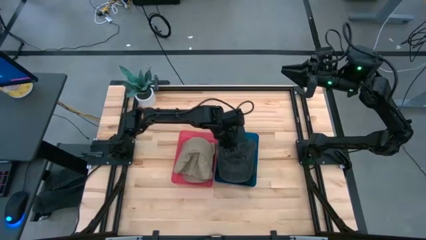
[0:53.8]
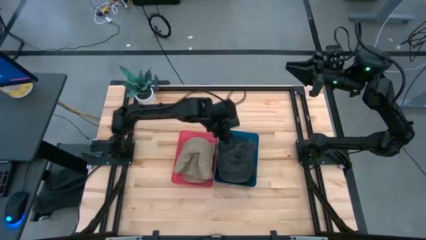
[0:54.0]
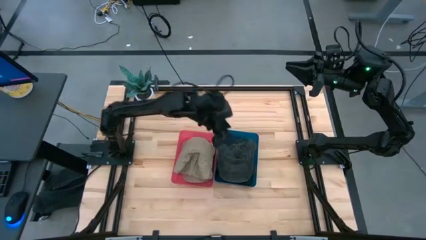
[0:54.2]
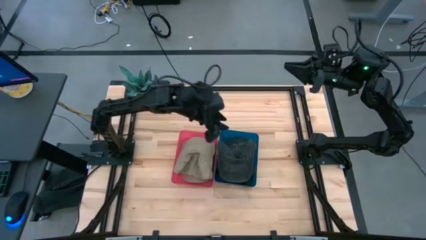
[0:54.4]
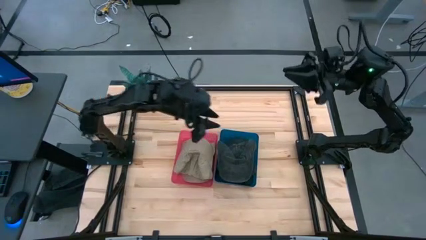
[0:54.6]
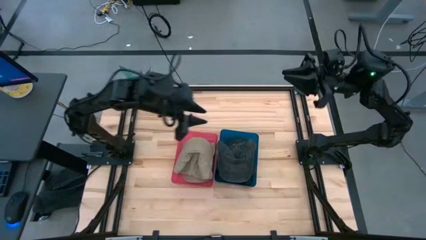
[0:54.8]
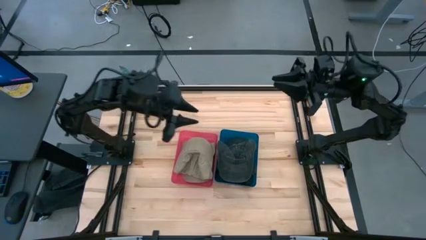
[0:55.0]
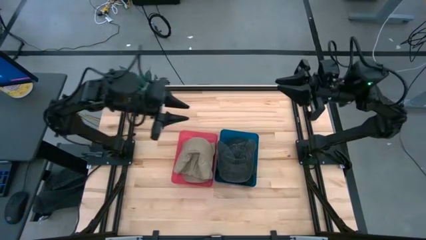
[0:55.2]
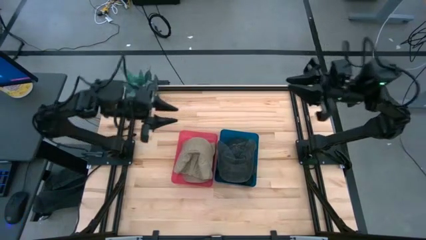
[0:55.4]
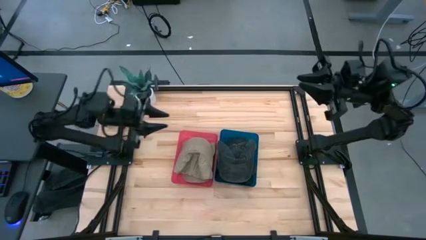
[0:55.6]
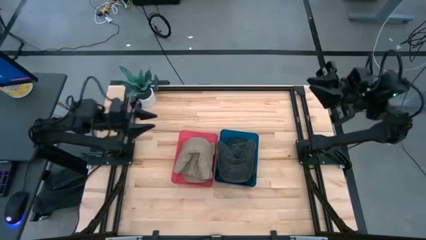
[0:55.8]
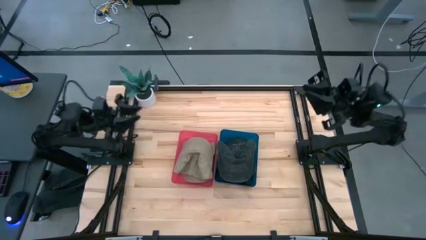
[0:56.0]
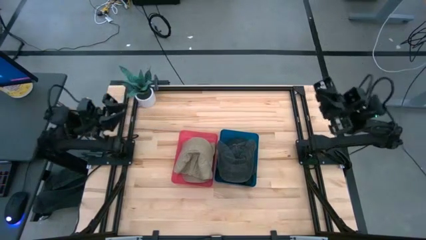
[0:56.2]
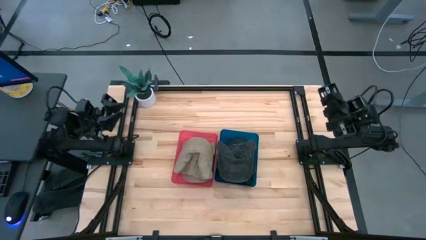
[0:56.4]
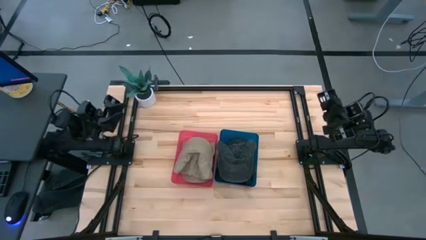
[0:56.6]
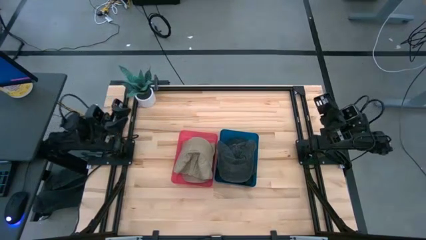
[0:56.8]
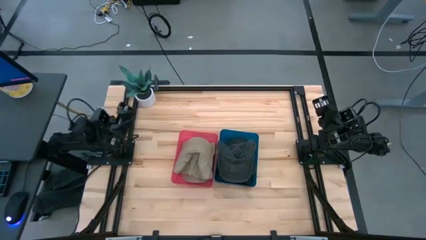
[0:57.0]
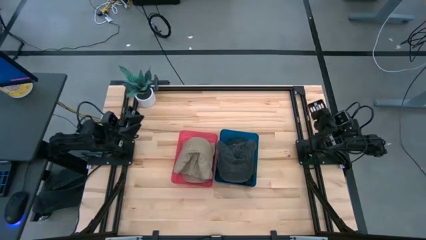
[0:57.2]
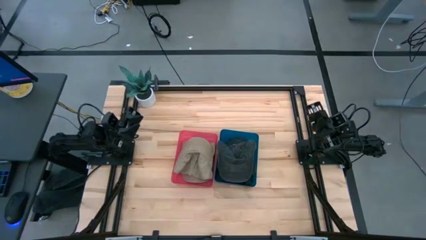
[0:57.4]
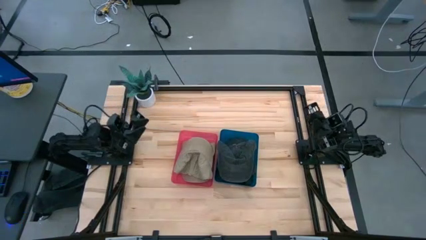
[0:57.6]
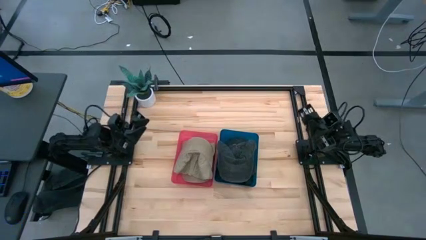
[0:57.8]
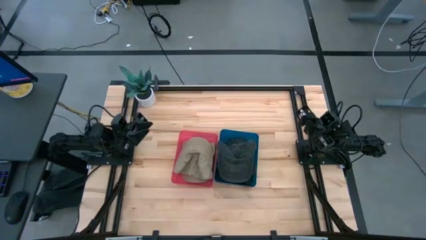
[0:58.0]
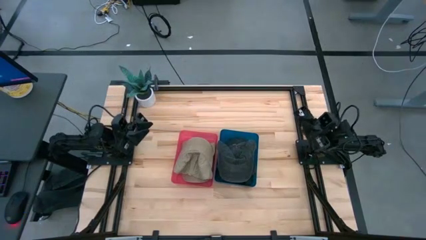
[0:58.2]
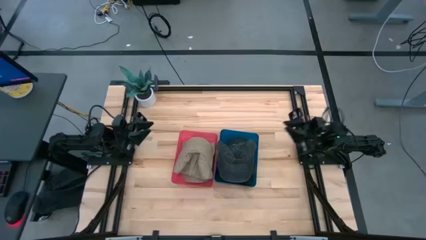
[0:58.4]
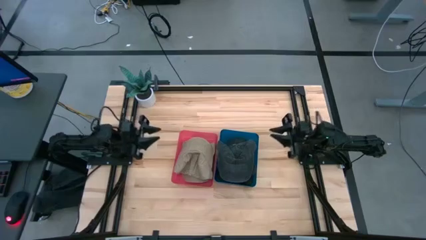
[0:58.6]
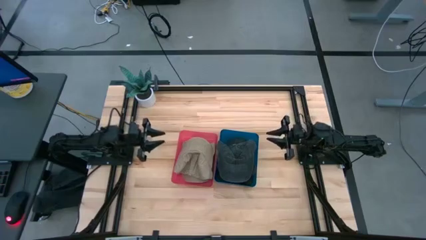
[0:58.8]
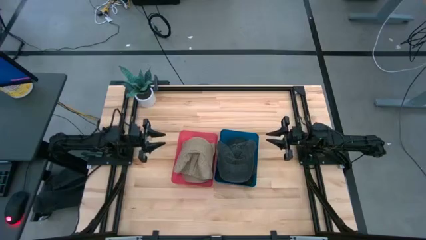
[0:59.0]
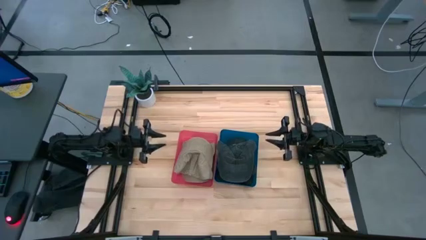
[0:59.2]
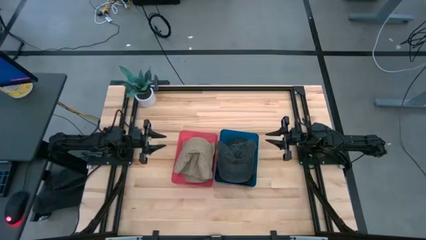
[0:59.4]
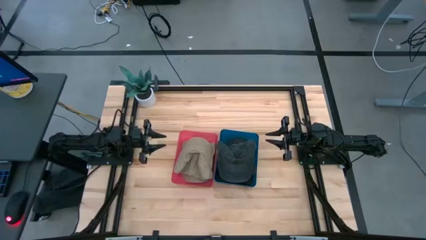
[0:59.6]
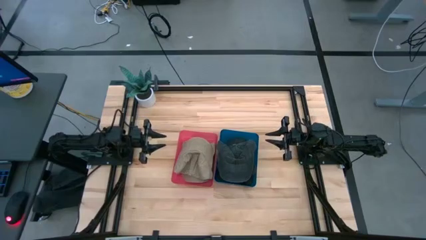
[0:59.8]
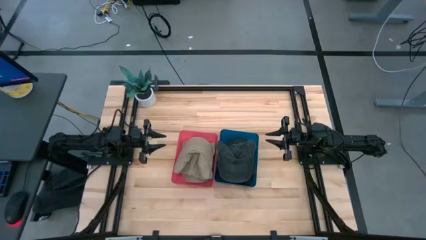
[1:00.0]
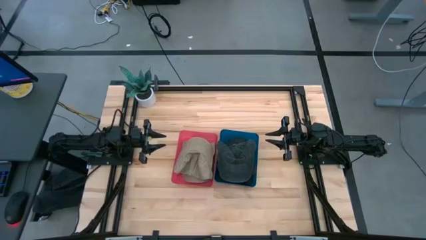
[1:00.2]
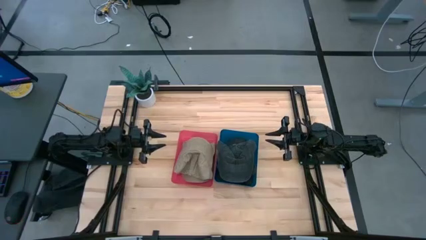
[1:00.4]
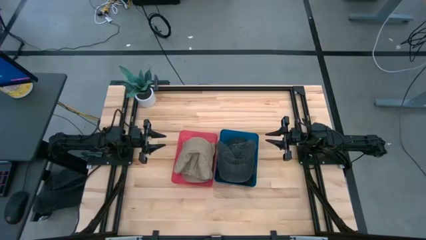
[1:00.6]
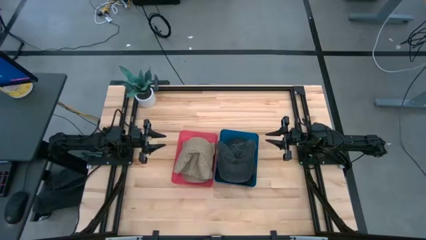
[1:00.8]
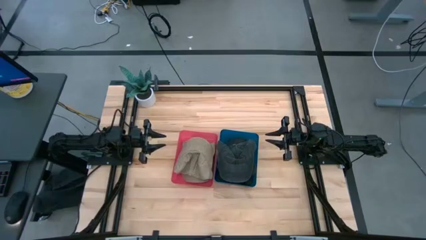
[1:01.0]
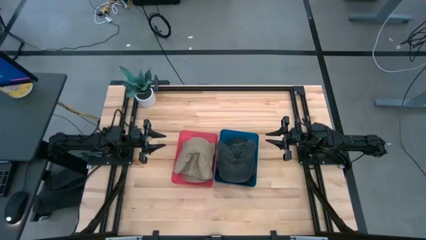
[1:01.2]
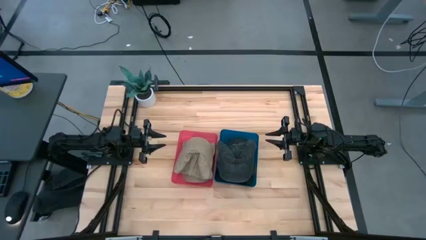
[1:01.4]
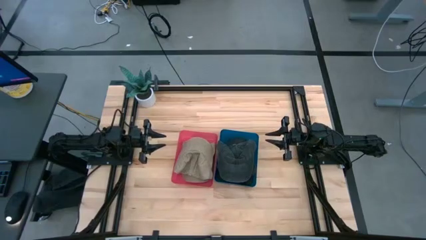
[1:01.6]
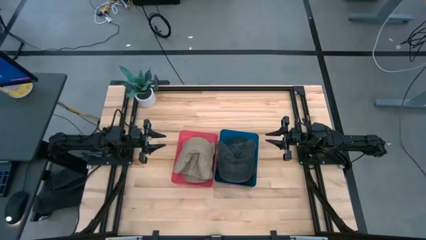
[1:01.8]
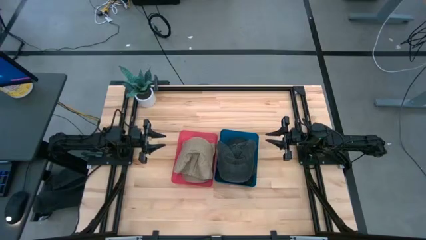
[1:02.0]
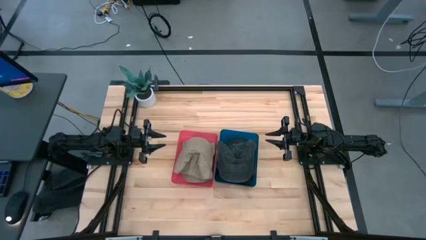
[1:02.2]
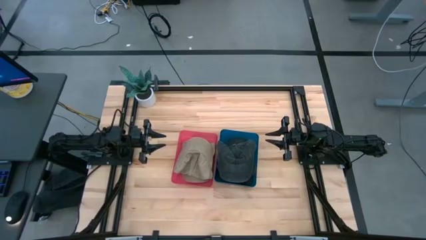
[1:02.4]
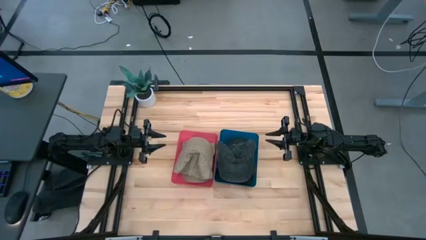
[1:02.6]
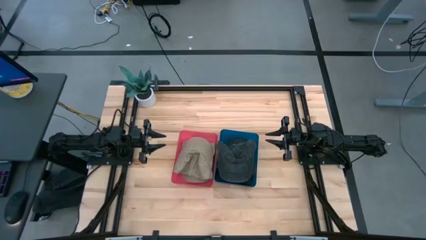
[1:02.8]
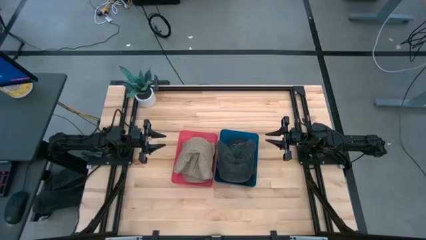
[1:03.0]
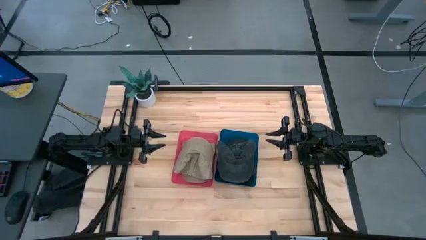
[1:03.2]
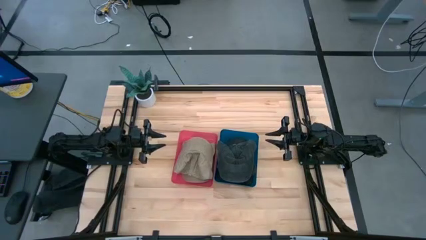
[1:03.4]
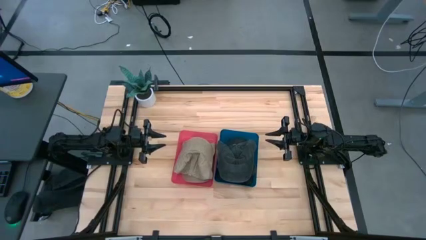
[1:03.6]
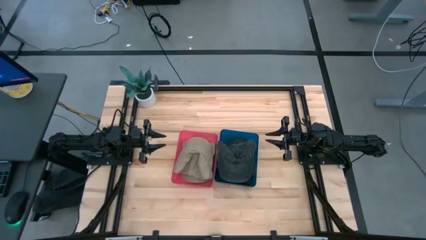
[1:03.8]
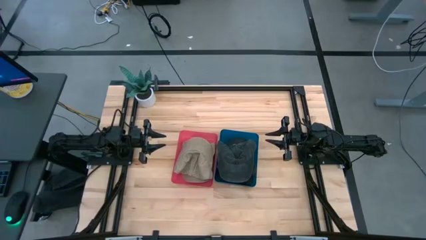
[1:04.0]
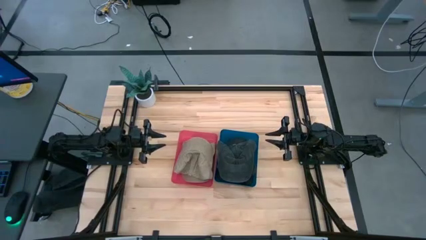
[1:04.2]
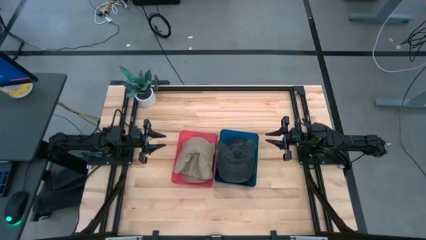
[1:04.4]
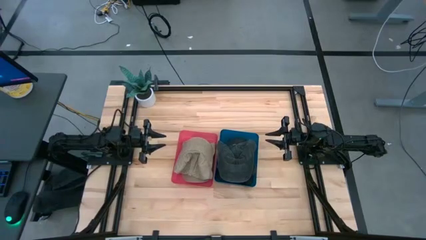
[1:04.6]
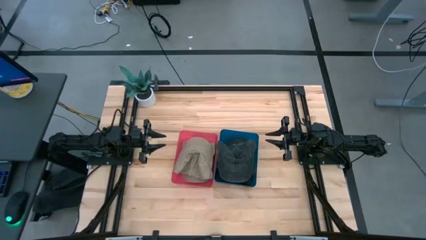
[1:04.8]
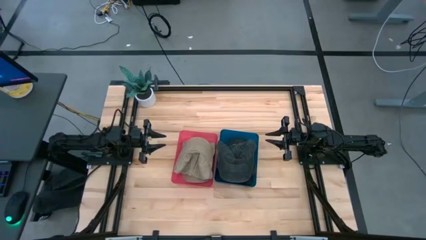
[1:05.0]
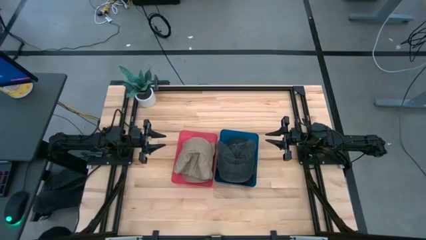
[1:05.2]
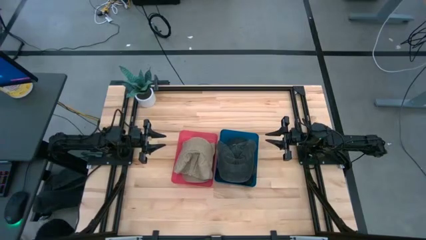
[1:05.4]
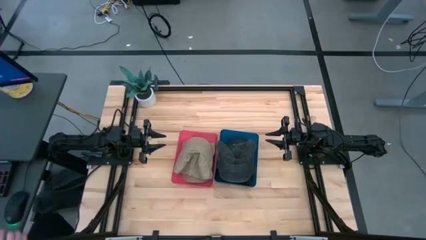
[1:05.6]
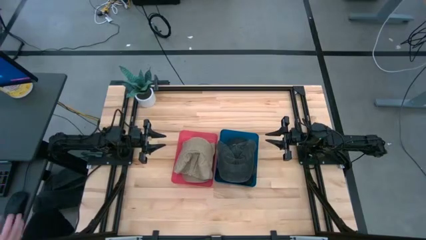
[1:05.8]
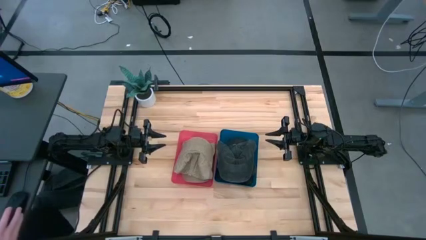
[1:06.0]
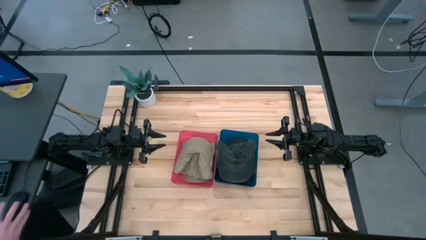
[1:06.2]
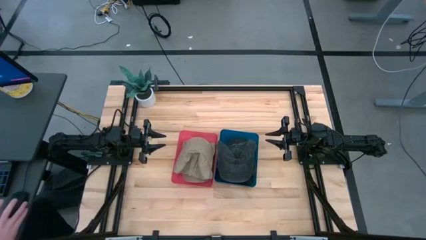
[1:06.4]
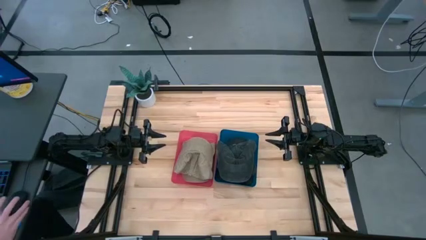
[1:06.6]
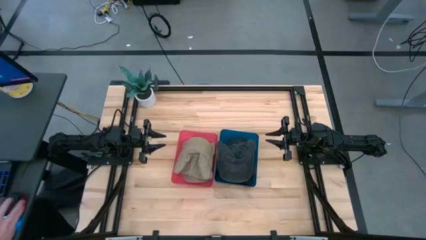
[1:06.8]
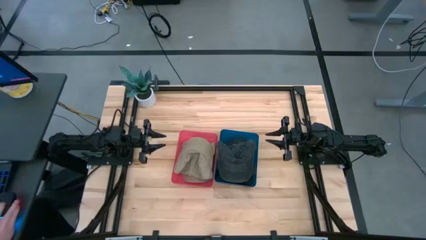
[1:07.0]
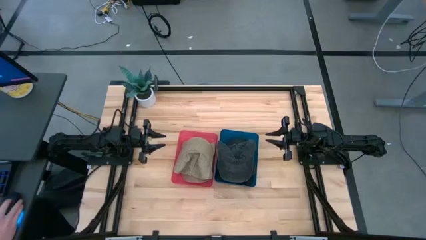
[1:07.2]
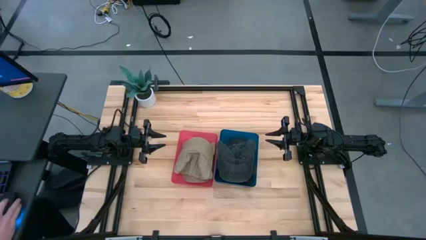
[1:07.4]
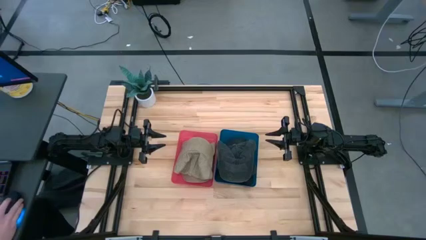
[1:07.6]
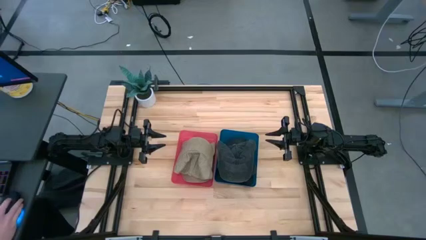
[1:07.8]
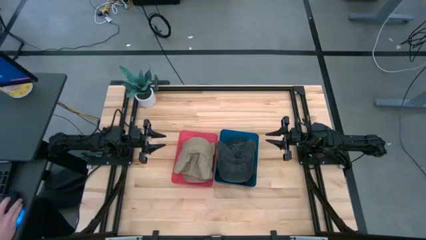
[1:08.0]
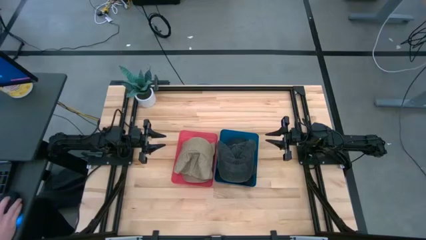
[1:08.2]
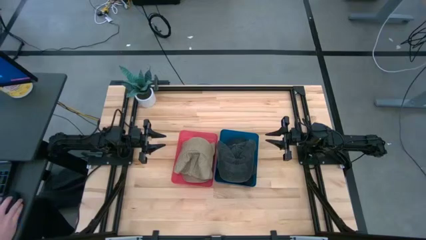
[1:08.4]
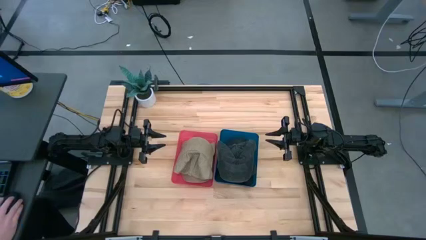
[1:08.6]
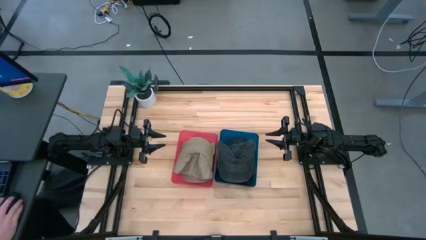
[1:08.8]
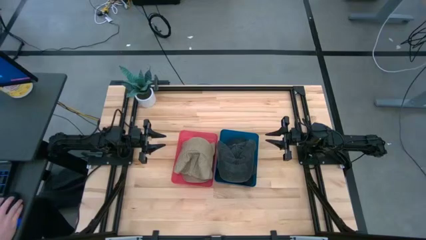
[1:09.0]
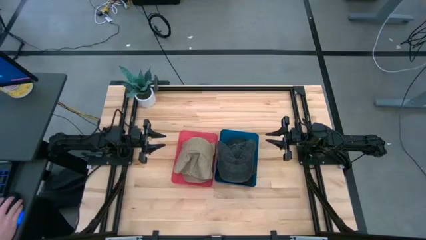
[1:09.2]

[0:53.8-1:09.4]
Task: Pick & Place hat
Return to Home Position
